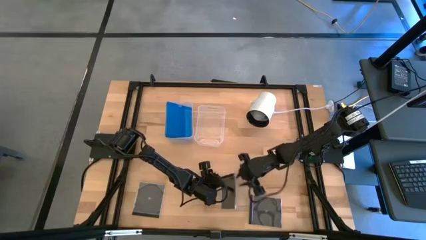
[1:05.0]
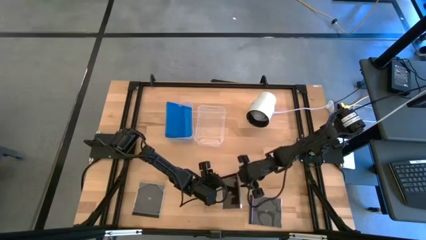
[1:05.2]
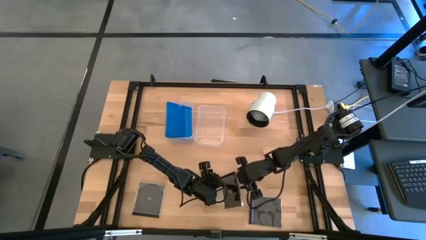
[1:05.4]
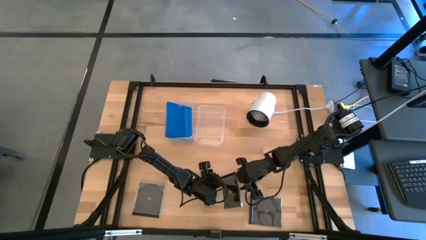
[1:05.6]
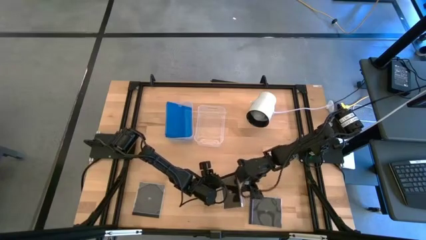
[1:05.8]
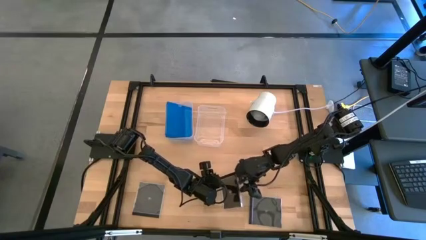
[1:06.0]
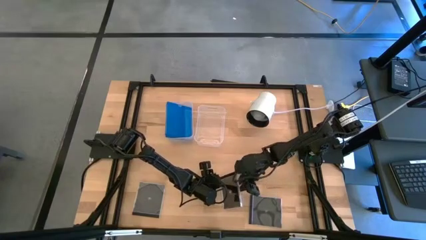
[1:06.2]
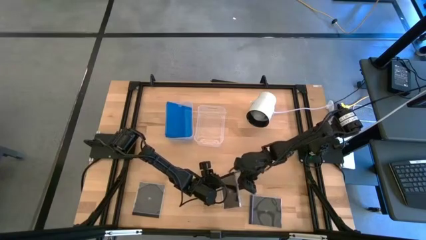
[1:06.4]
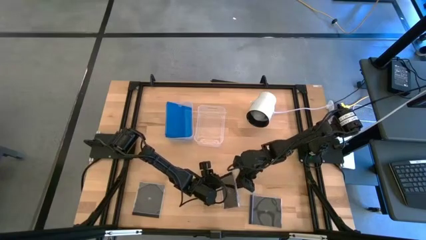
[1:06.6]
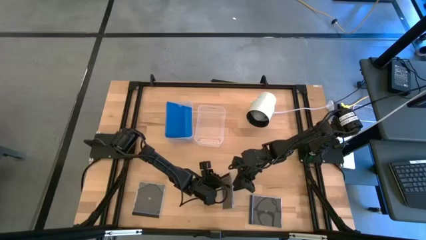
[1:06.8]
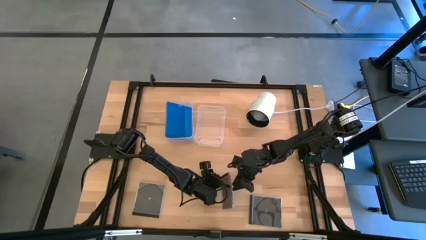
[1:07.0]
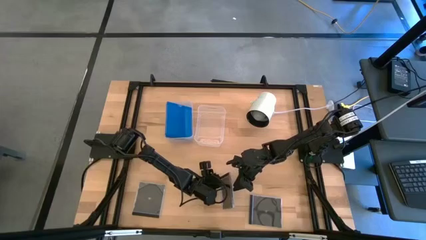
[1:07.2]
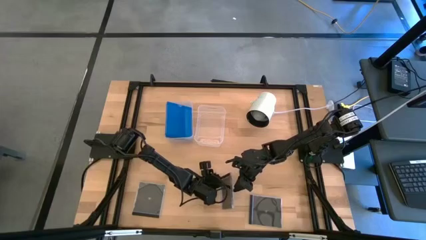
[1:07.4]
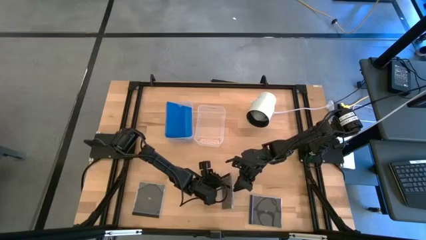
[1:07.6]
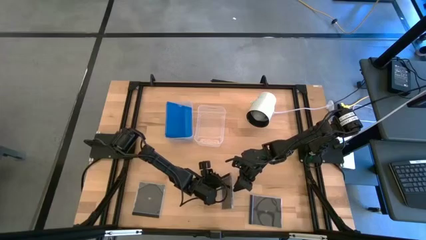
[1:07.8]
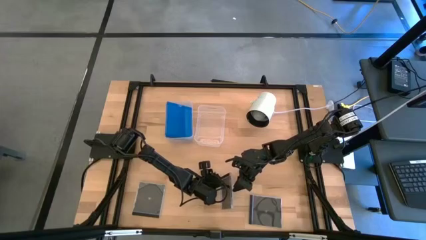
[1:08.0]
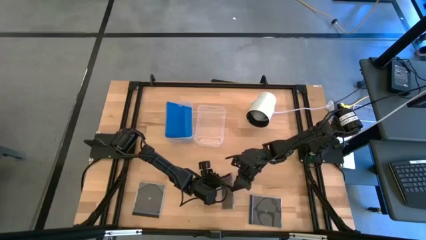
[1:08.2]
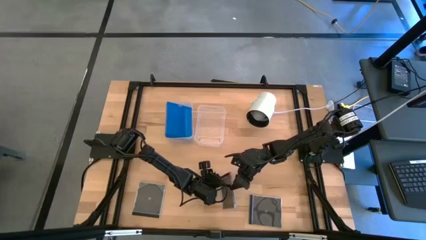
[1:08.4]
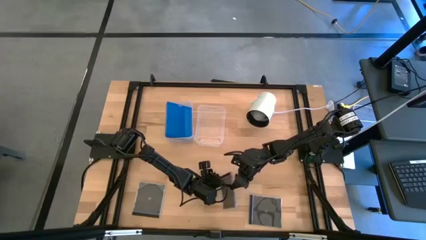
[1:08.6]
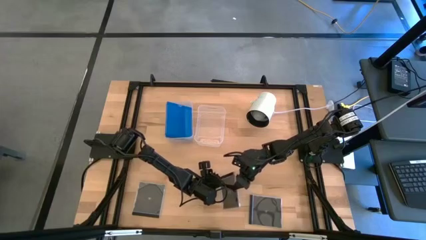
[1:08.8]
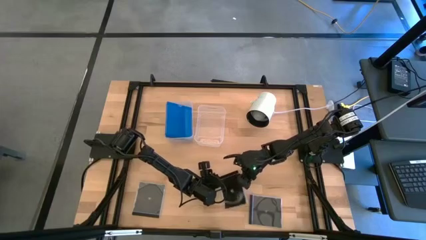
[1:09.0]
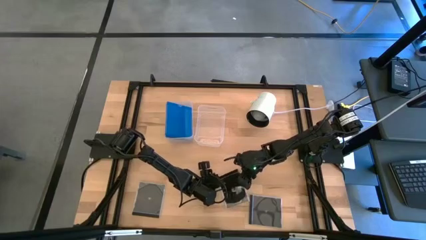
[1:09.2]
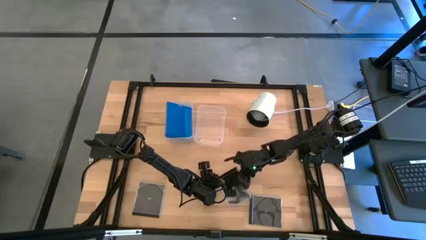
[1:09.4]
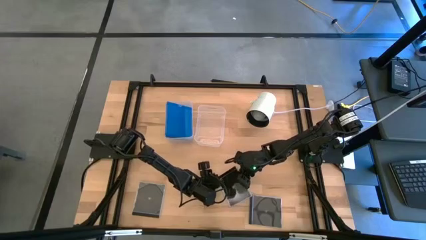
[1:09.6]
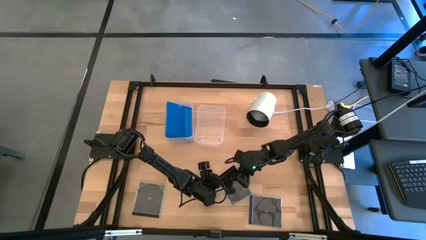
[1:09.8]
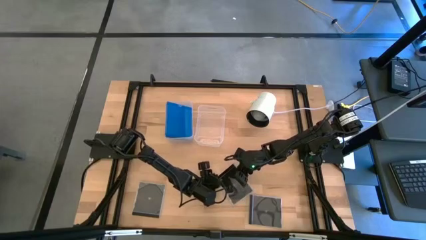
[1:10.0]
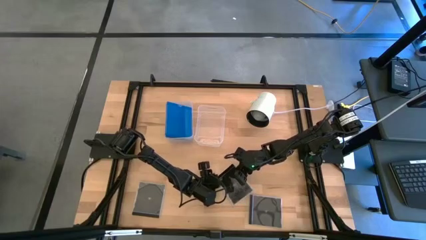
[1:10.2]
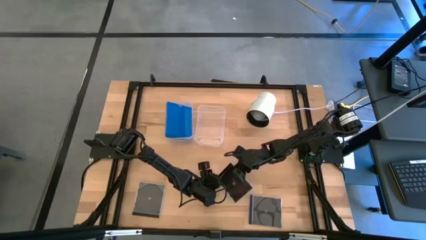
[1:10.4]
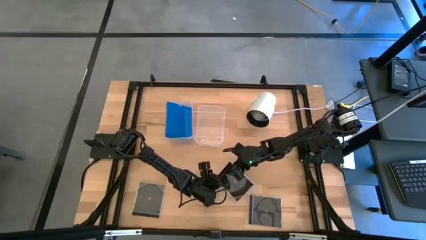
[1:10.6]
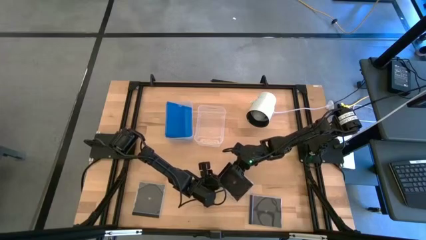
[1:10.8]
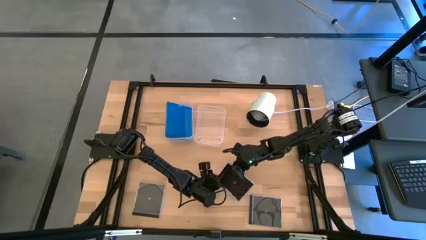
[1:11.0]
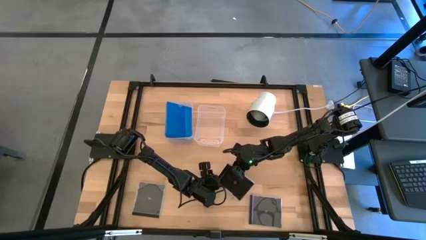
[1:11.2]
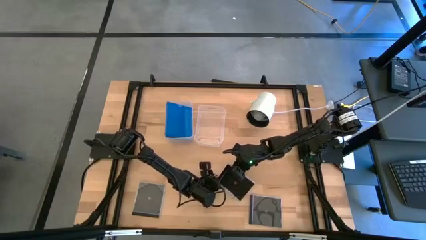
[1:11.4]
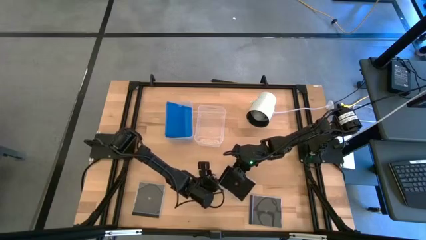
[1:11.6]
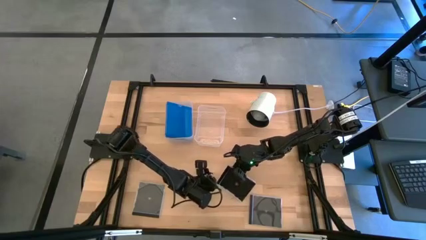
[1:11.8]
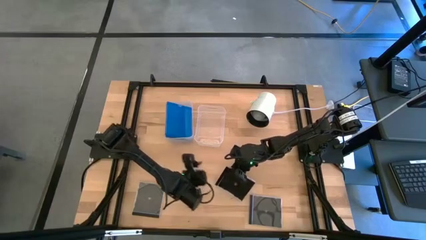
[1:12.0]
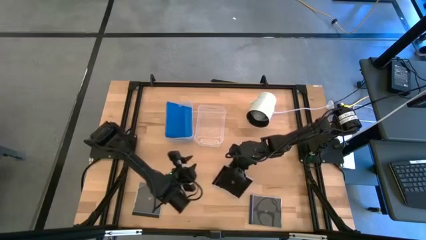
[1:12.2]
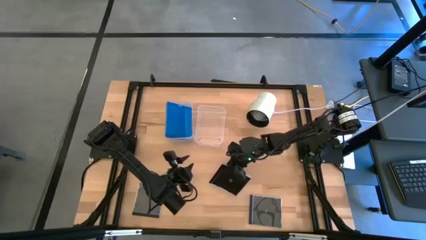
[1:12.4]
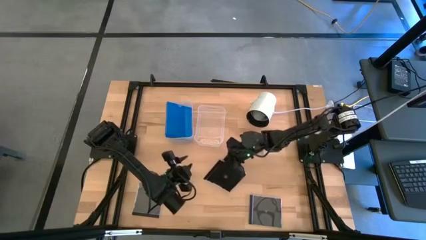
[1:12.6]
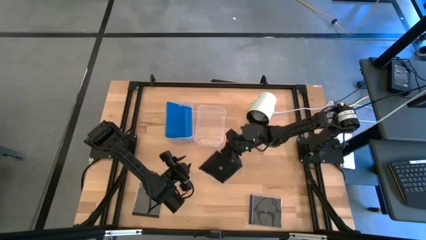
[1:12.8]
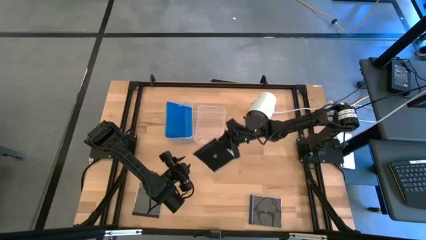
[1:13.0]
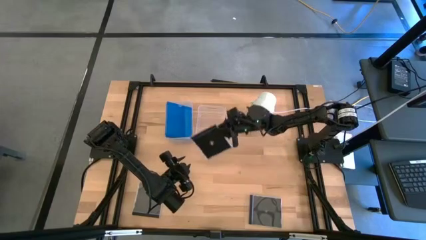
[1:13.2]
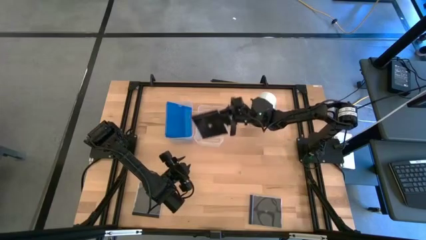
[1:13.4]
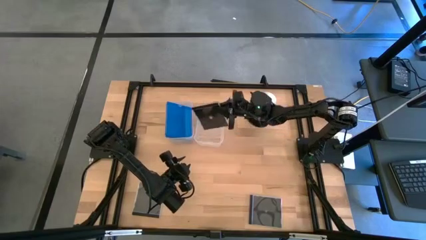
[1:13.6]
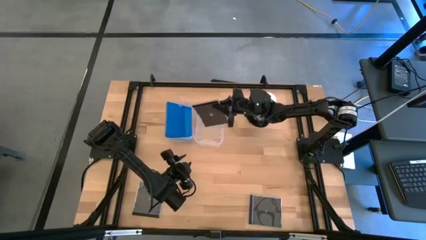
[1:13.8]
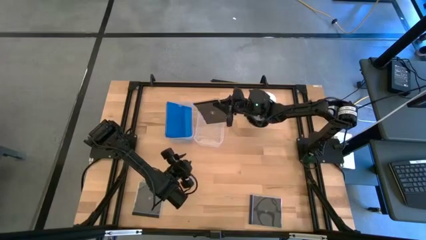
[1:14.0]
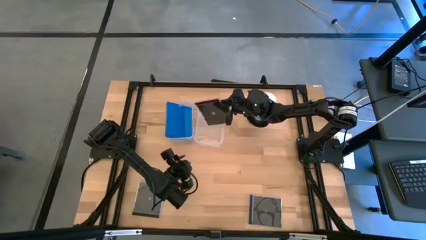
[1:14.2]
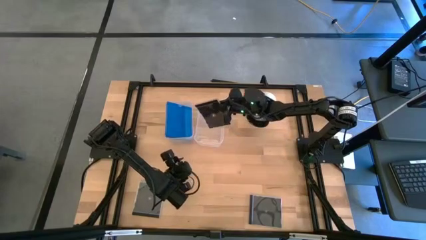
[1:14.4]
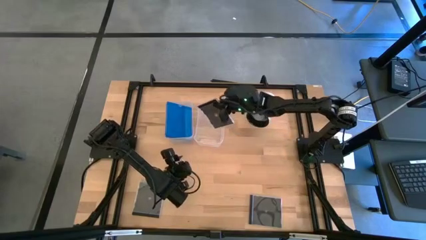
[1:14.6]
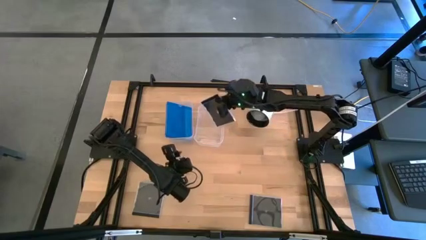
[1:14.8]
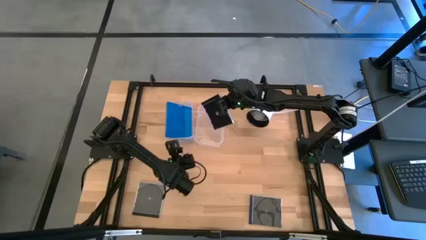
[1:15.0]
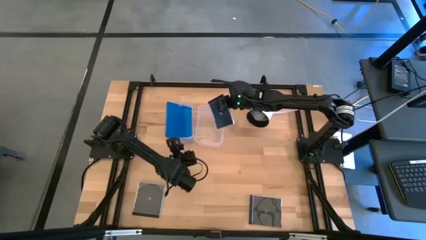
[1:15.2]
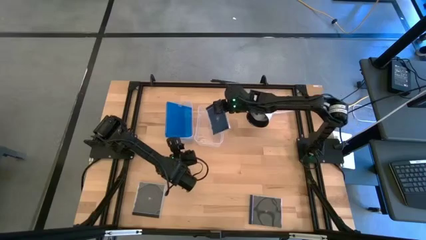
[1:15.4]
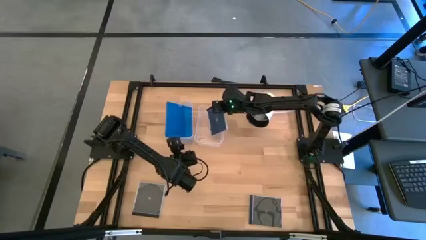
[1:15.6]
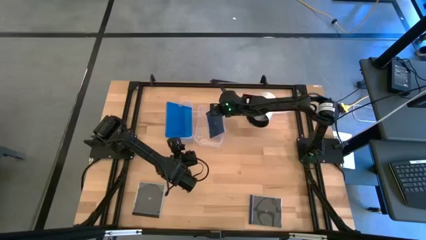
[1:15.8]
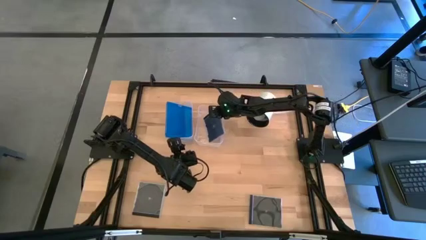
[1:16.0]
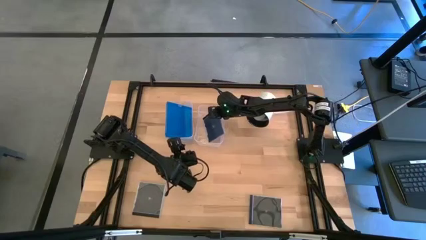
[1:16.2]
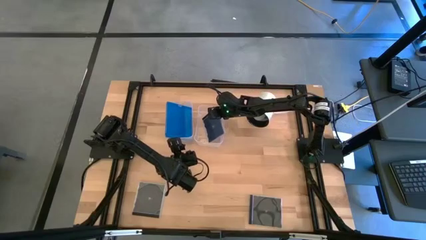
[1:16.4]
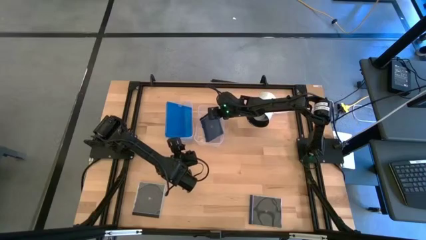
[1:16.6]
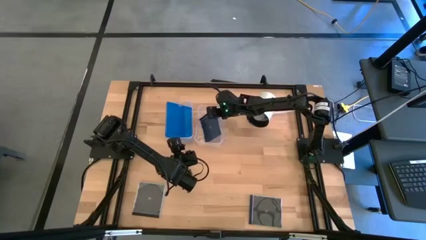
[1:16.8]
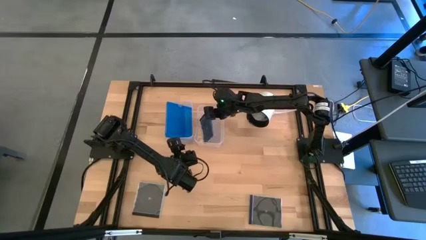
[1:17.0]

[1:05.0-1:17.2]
Task: Pick & place jewel cases by type
Put the top black cd case into the right transparent bin

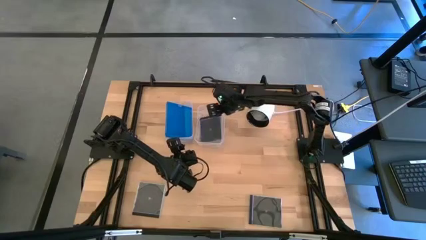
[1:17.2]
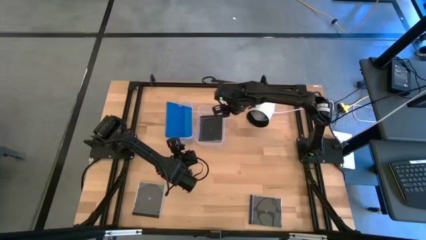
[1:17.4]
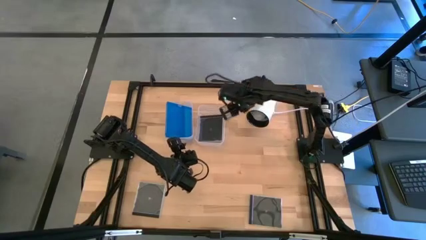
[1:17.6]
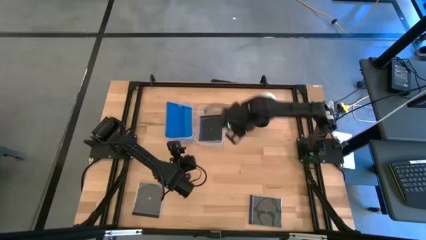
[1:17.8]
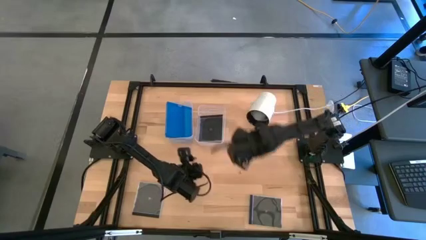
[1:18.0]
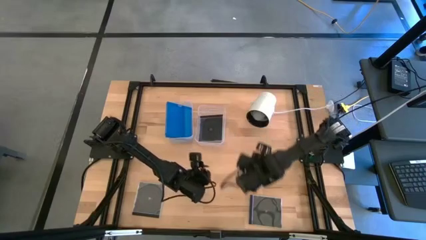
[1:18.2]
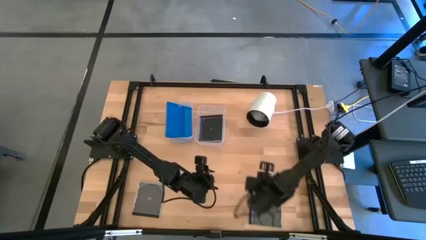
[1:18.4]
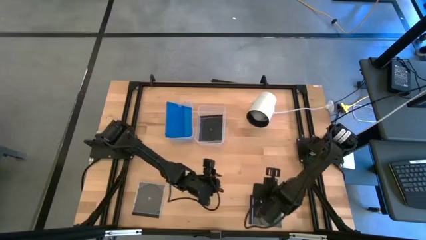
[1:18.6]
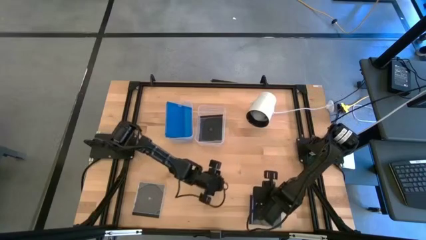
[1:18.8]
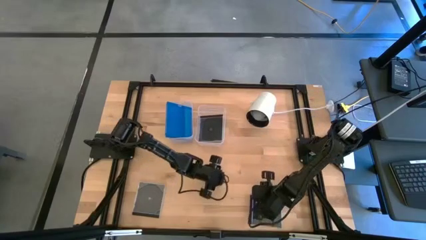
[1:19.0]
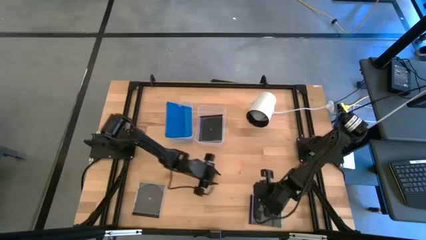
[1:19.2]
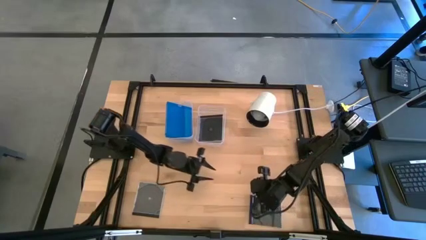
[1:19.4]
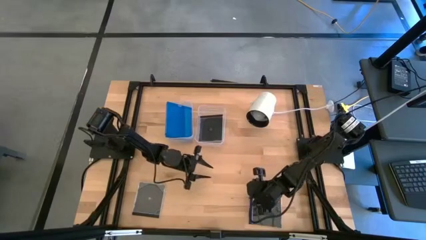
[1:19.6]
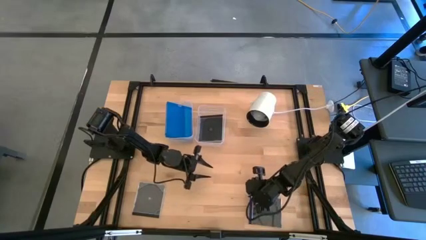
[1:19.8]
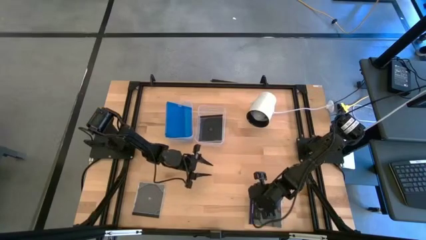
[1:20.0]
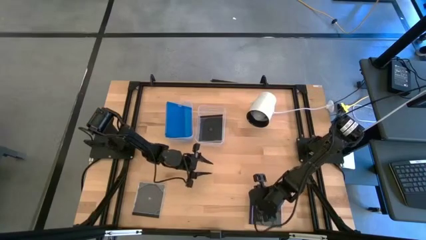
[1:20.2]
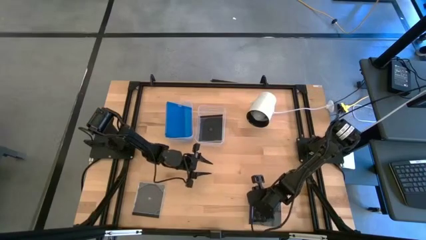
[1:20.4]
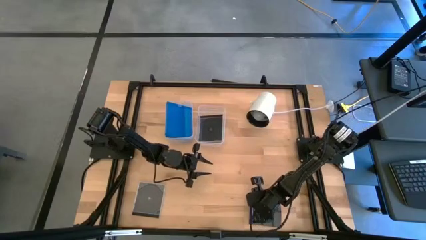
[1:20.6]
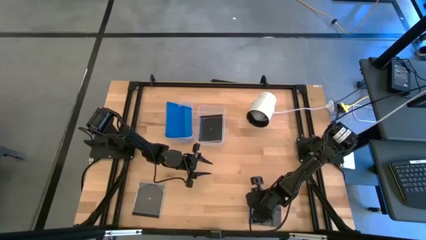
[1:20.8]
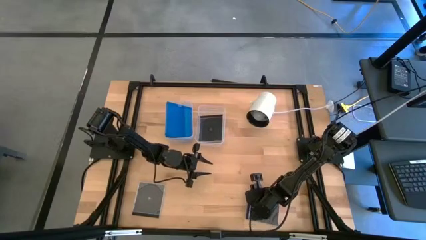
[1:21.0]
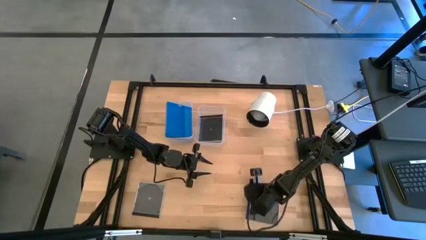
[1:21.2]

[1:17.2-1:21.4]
Put the right black cd case into the right transparent bin
